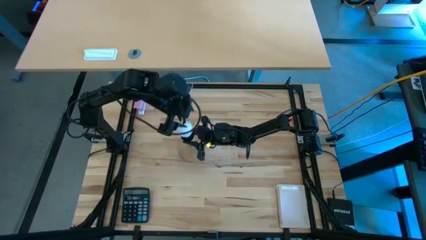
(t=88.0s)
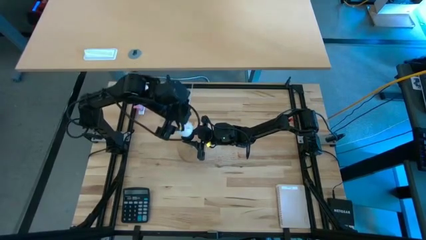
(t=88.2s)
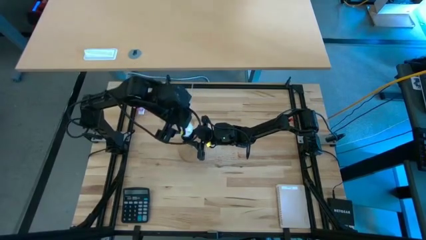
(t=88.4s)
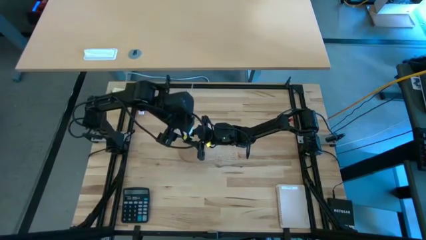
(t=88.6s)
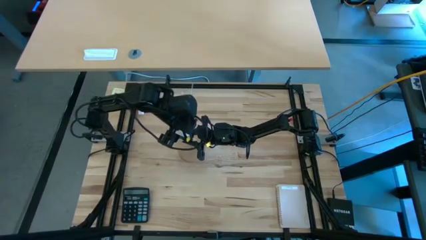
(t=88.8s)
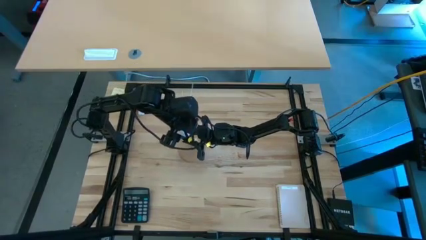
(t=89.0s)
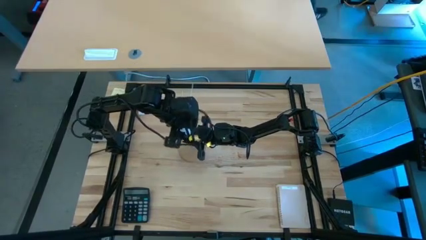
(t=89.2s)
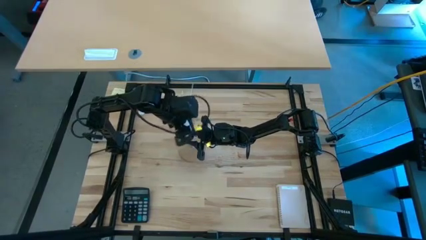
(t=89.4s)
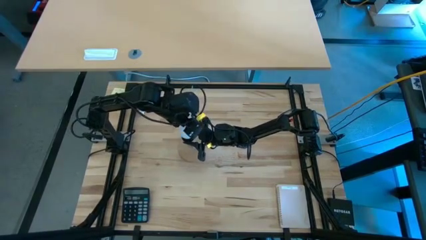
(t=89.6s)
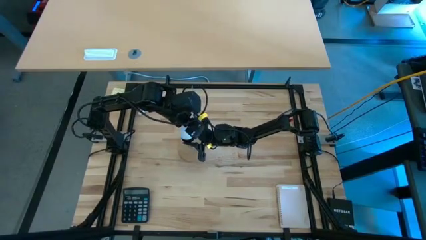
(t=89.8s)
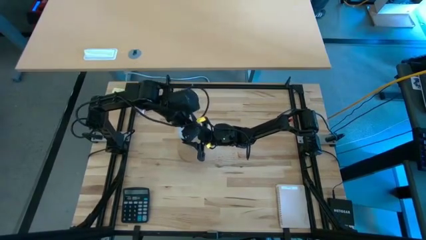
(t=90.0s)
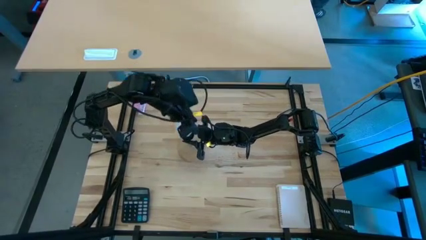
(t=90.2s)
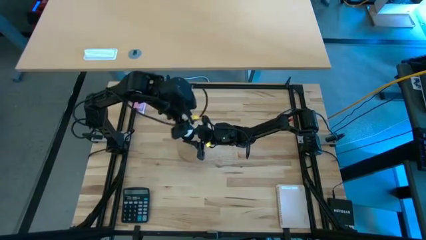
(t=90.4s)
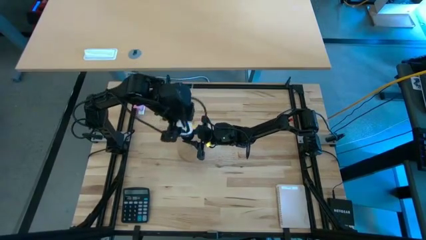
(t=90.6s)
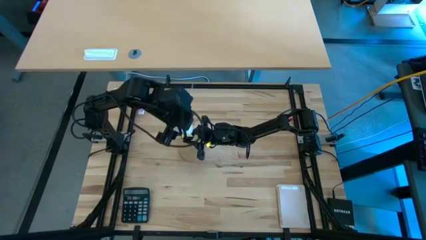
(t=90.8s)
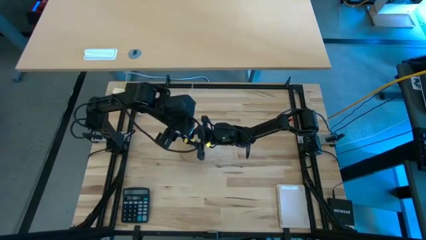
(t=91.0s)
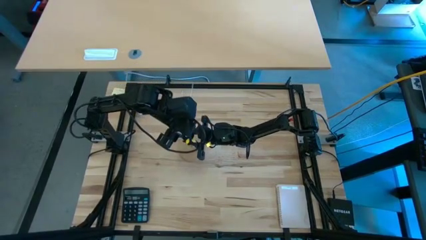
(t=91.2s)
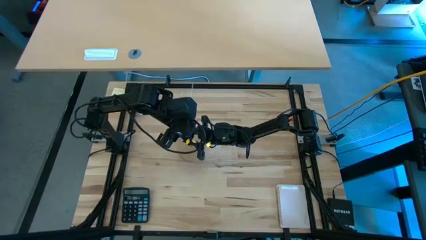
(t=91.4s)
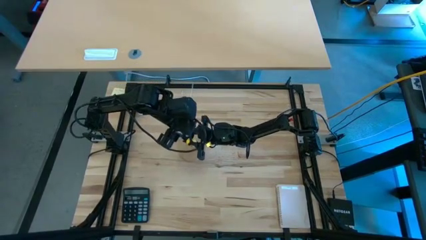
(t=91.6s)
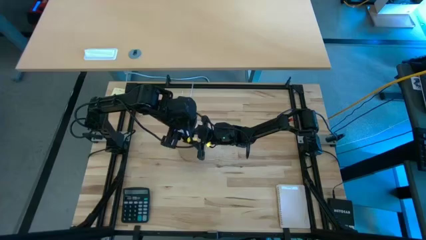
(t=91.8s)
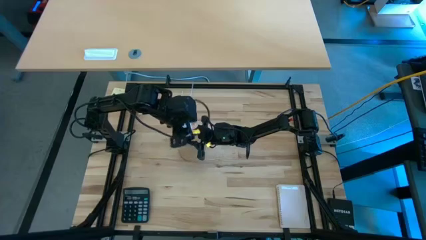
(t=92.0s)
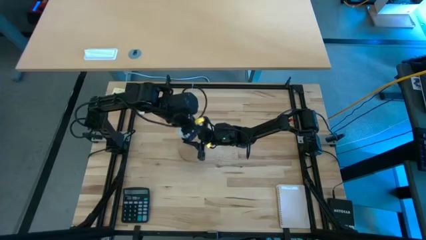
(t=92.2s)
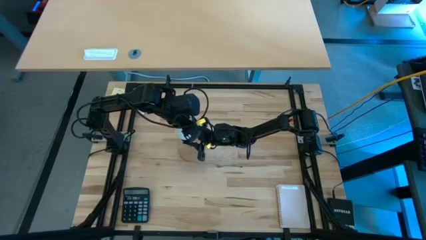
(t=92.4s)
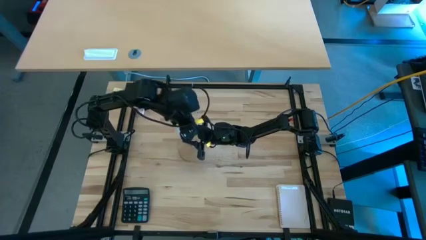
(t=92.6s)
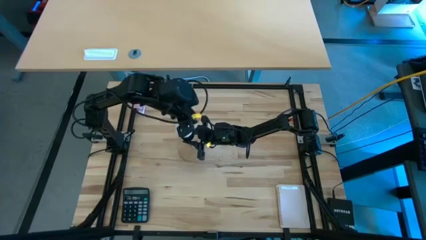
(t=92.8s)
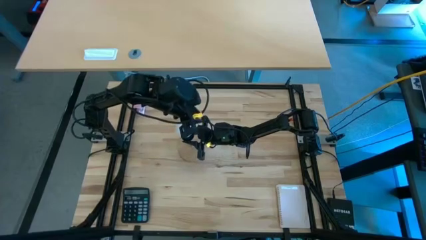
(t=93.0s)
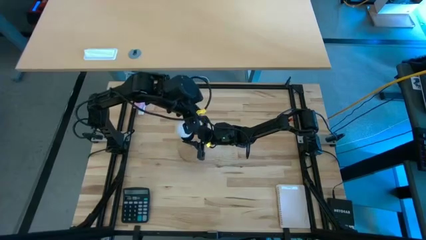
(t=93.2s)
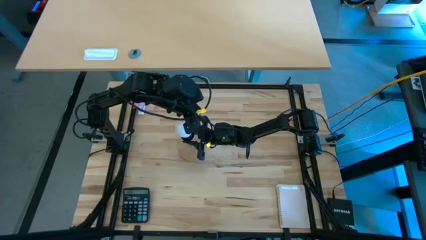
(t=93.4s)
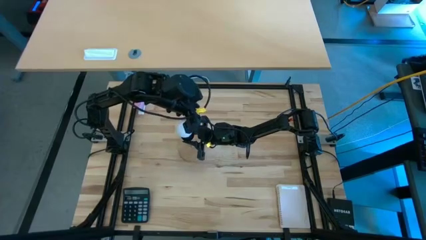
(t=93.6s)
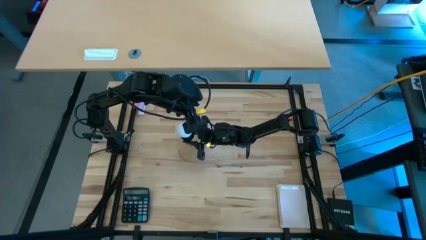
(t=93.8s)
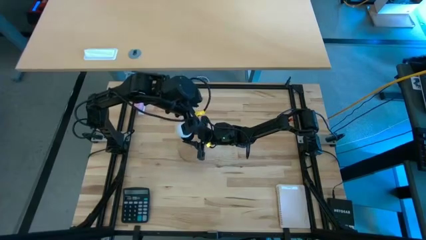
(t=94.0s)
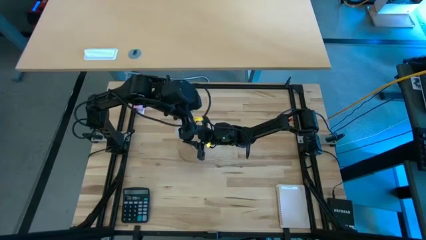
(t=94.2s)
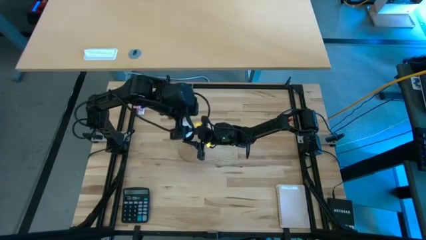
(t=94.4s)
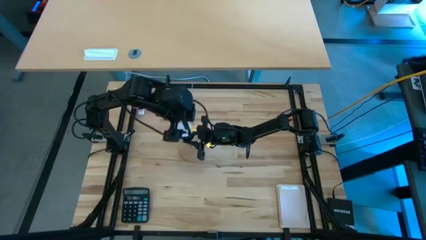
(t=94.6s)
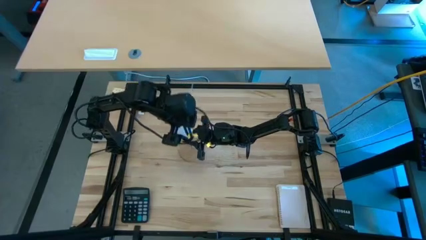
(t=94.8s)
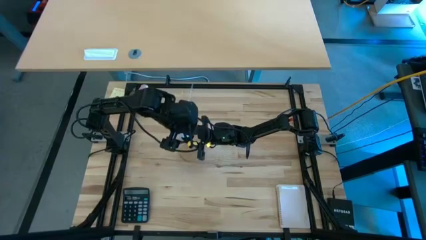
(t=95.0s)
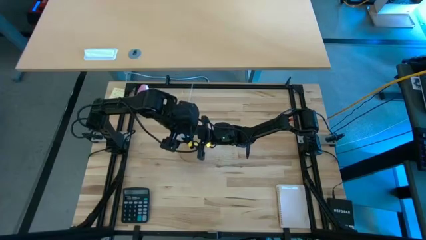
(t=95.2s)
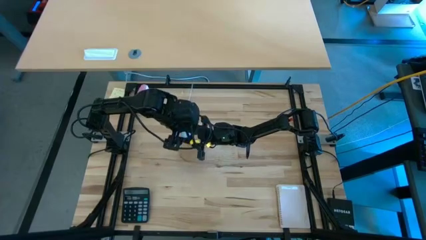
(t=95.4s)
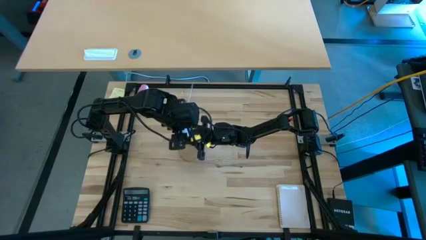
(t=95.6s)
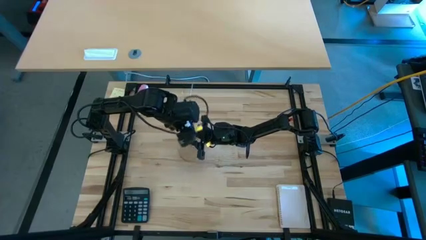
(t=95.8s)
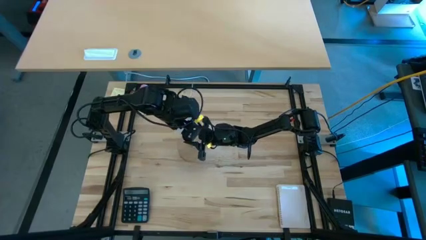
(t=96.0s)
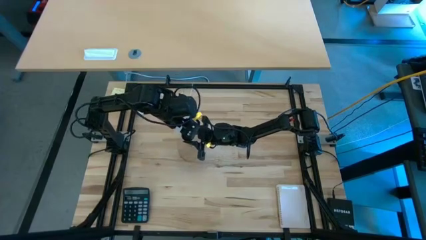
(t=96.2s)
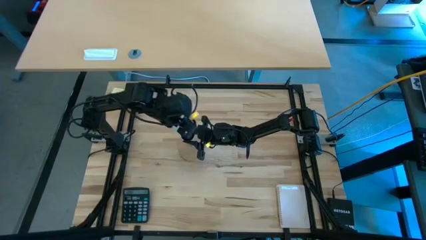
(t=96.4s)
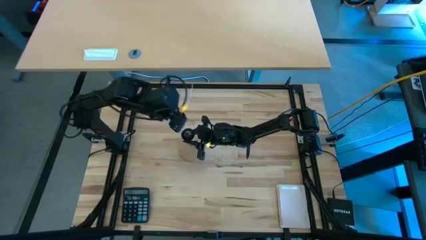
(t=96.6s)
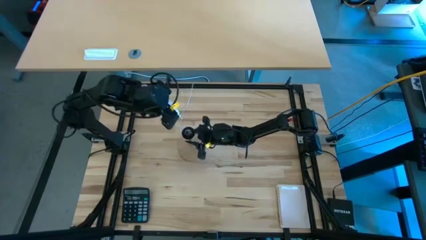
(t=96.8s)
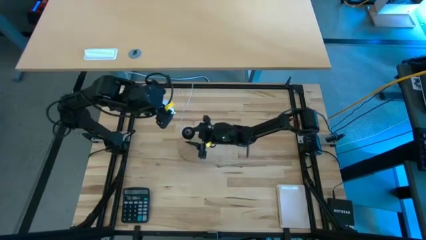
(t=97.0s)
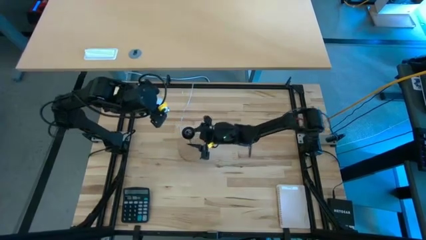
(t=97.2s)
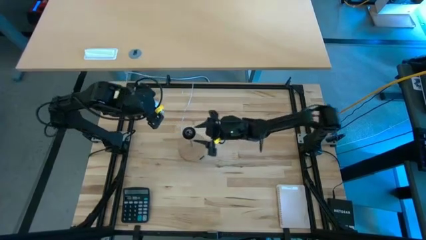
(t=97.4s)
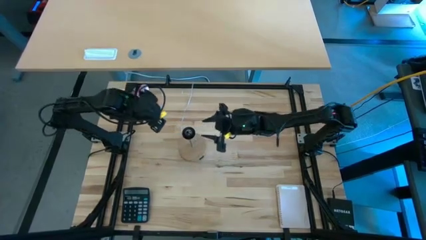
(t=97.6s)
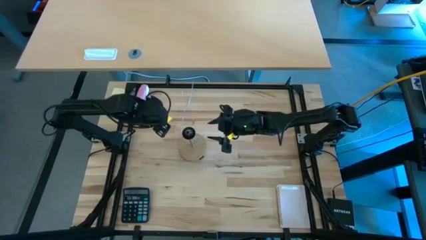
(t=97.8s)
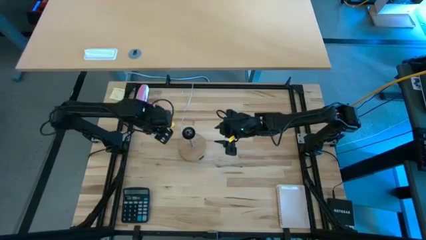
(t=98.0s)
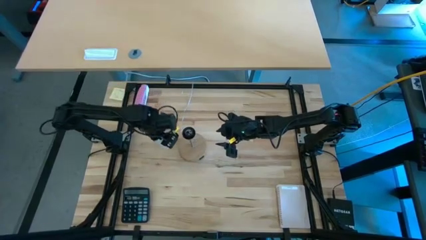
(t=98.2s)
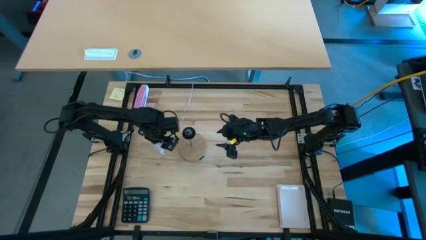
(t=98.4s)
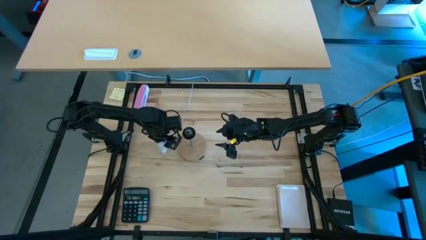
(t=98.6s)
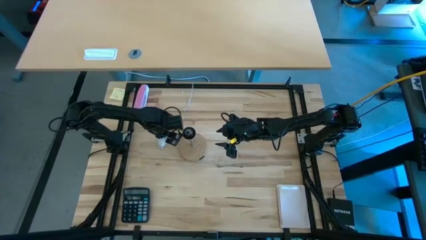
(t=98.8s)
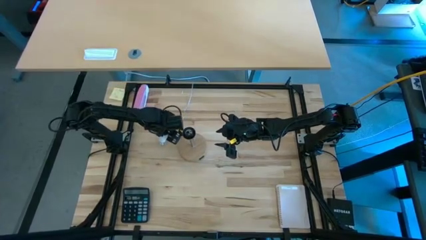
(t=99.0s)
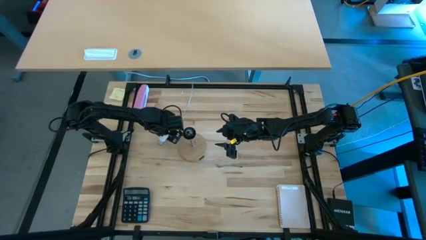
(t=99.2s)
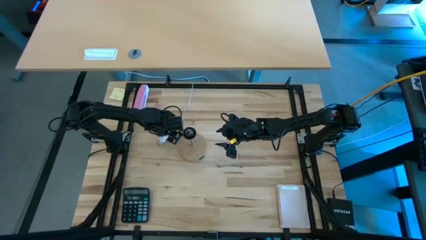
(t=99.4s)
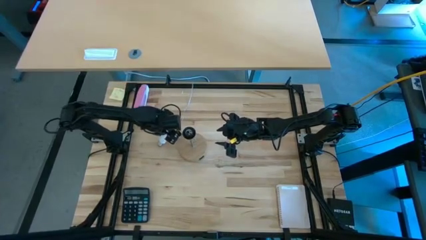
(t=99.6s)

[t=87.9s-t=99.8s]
Task: Screw lightbulb
Remove the lightbulb from the lamp

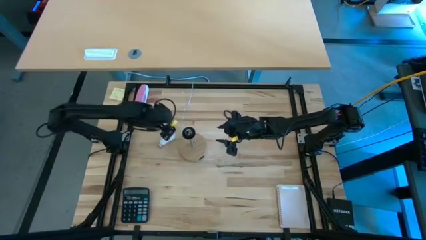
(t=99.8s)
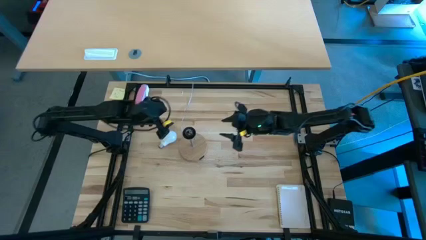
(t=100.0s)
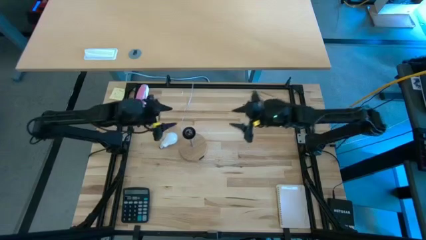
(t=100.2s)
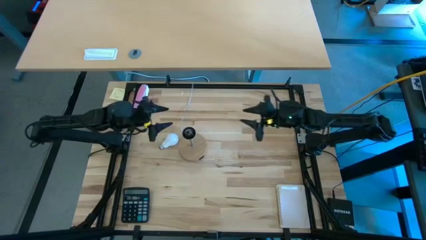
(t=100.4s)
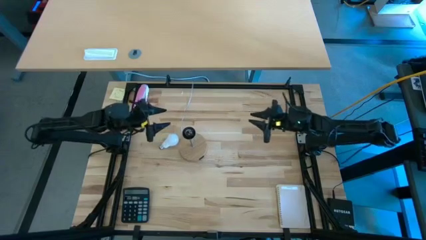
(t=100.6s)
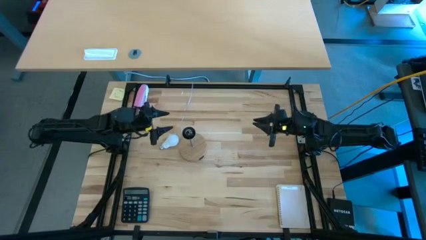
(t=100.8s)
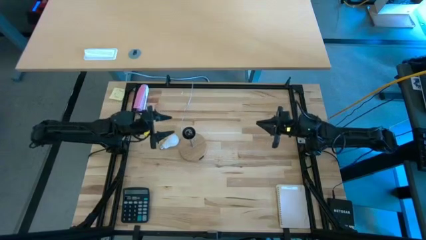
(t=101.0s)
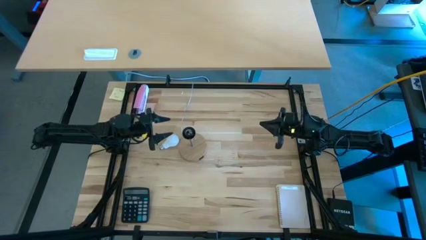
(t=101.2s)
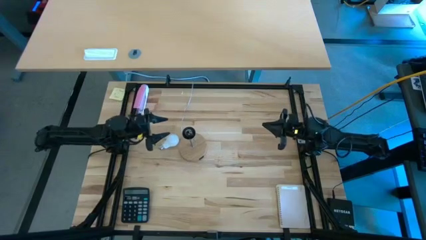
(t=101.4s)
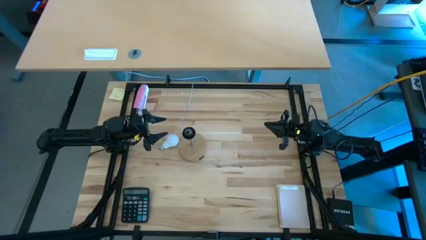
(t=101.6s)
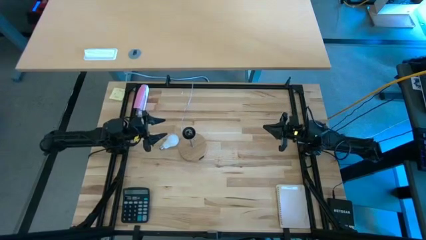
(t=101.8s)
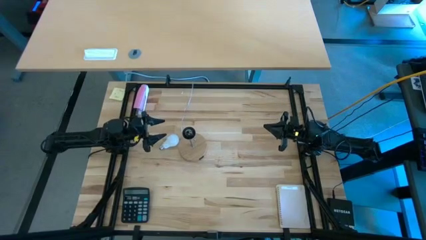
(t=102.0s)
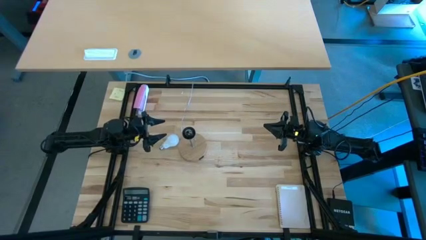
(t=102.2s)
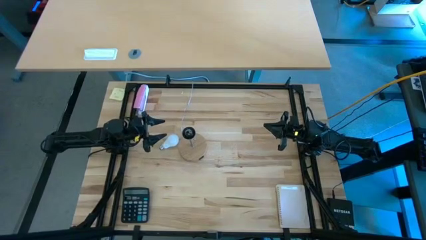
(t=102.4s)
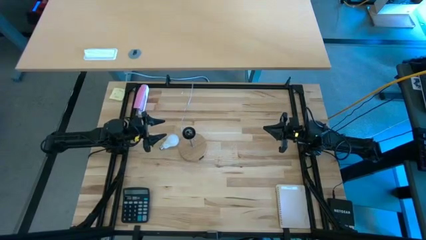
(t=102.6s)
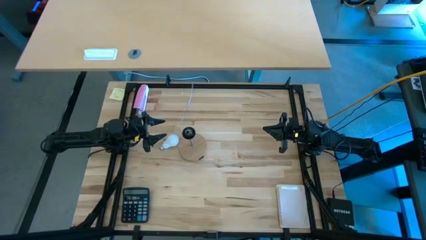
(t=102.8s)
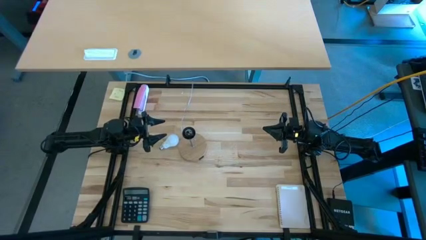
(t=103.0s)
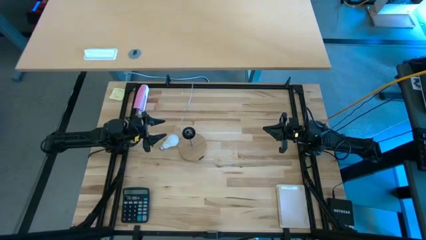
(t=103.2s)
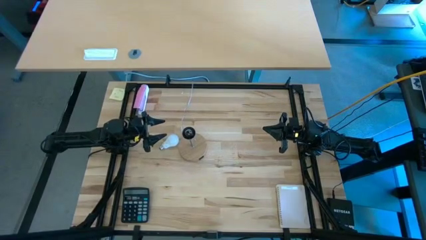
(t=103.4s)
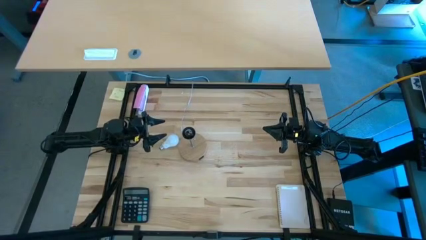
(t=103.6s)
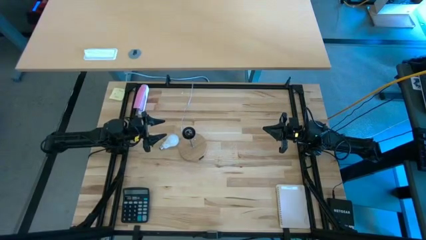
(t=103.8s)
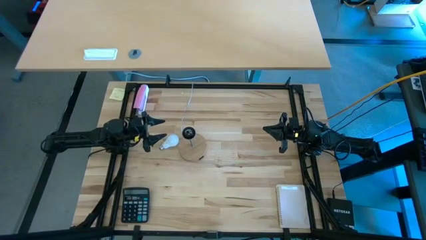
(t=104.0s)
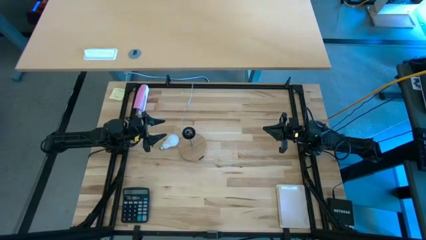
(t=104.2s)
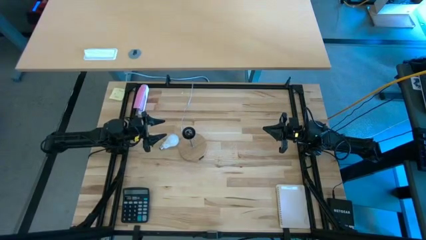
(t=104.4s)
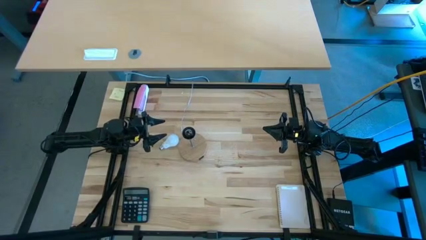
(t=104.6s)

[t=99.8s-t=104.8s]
Return to Home Position
